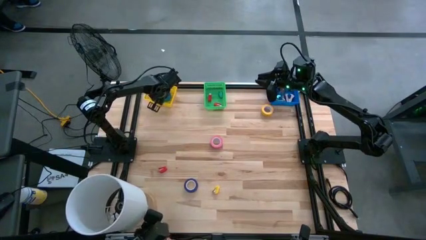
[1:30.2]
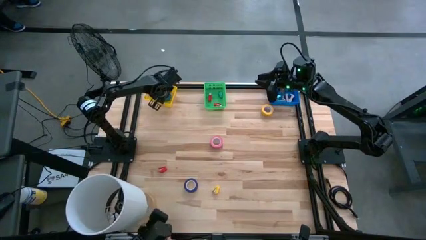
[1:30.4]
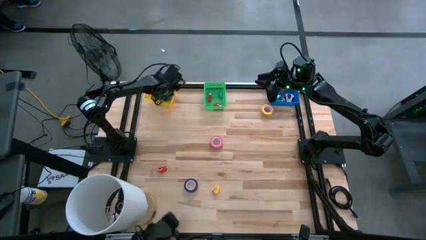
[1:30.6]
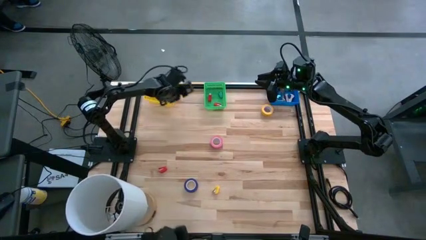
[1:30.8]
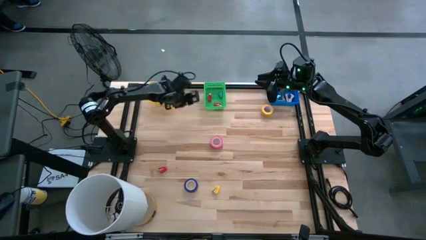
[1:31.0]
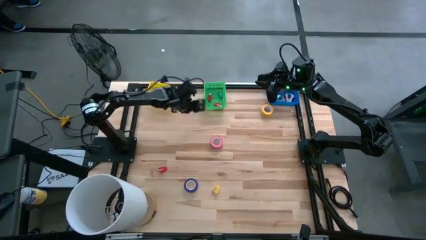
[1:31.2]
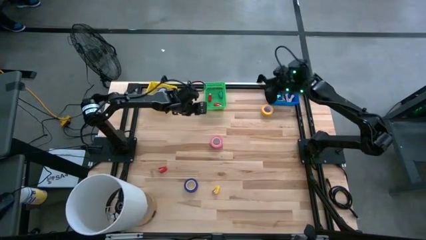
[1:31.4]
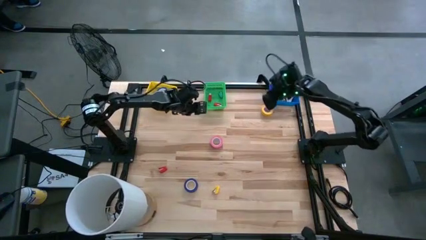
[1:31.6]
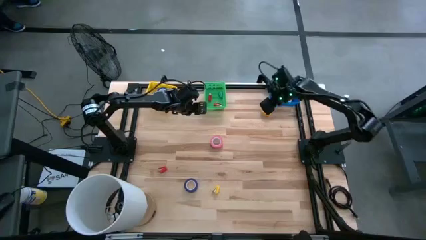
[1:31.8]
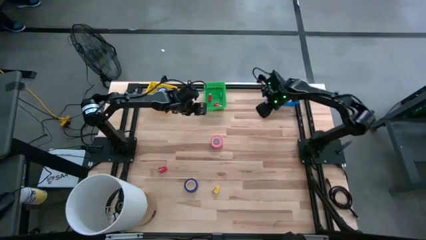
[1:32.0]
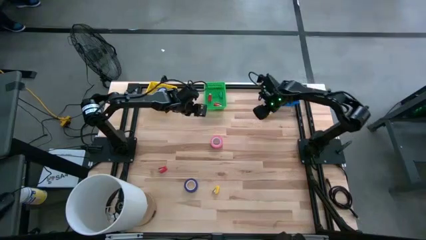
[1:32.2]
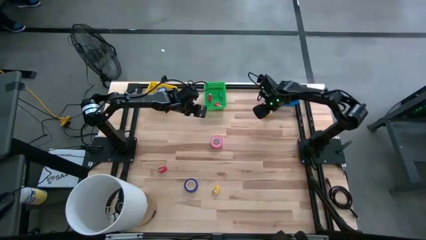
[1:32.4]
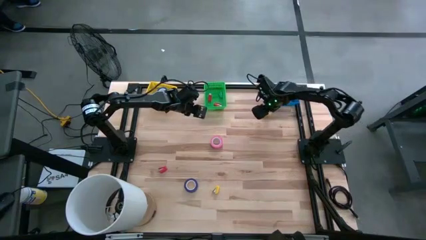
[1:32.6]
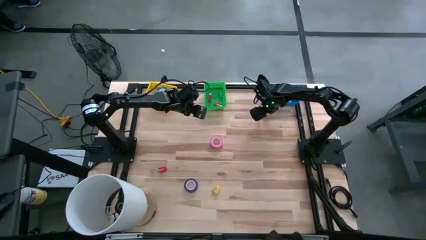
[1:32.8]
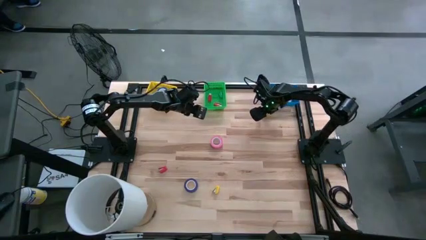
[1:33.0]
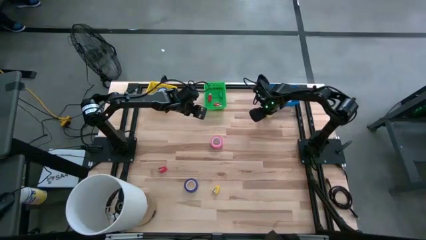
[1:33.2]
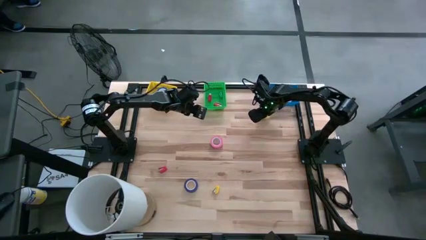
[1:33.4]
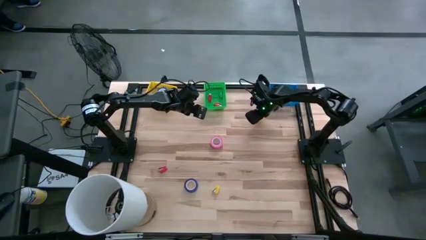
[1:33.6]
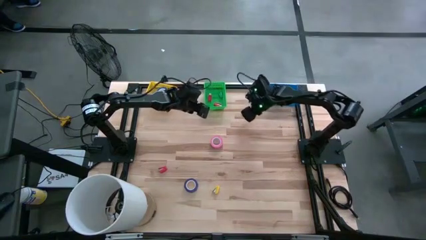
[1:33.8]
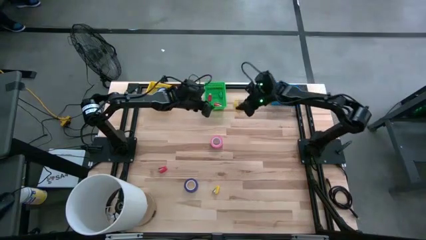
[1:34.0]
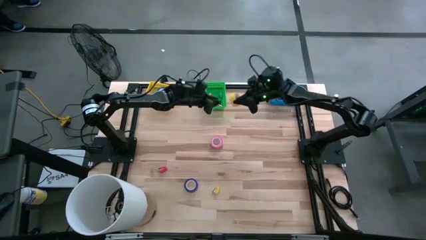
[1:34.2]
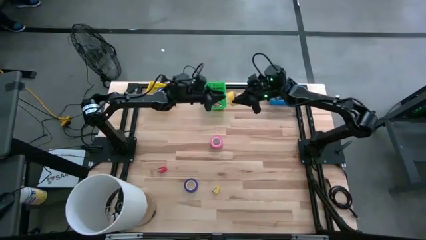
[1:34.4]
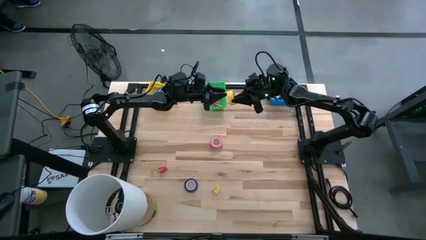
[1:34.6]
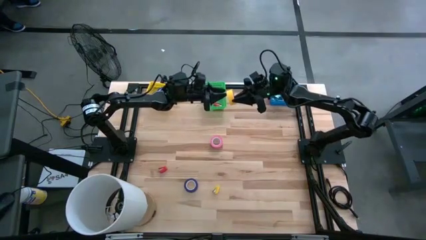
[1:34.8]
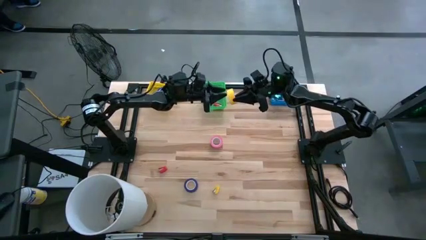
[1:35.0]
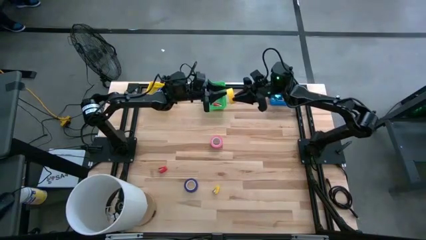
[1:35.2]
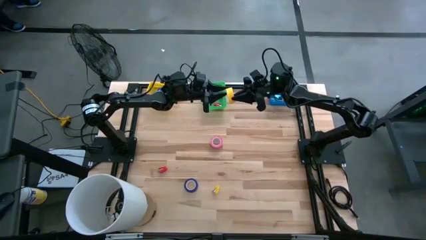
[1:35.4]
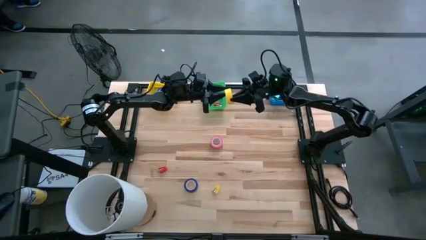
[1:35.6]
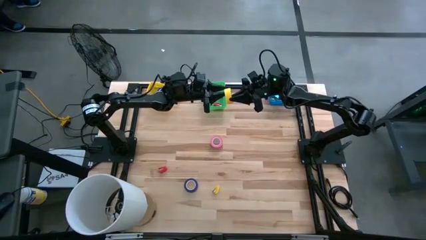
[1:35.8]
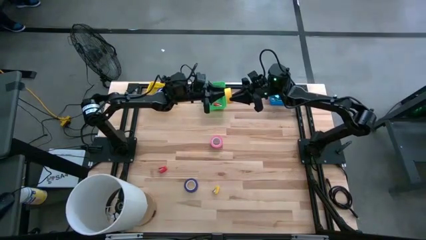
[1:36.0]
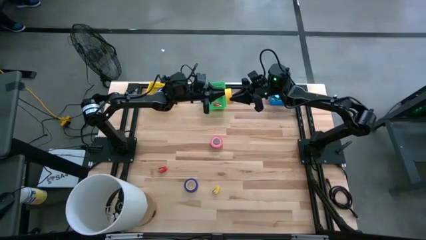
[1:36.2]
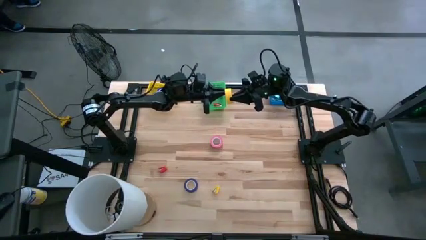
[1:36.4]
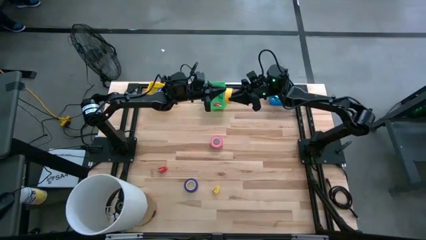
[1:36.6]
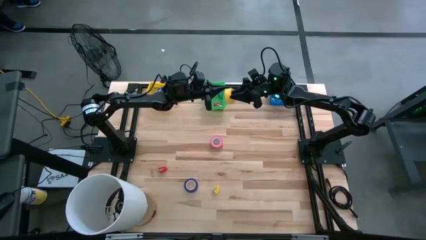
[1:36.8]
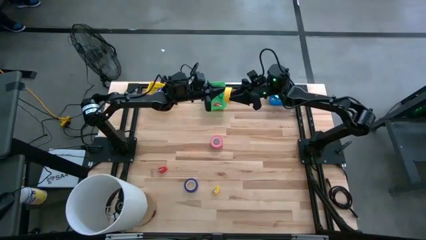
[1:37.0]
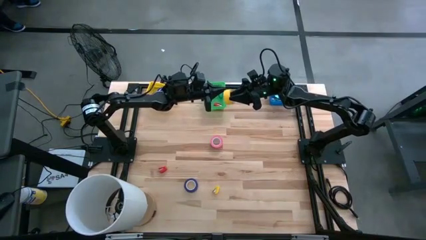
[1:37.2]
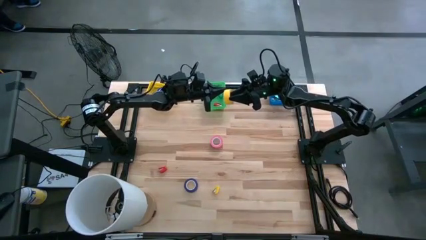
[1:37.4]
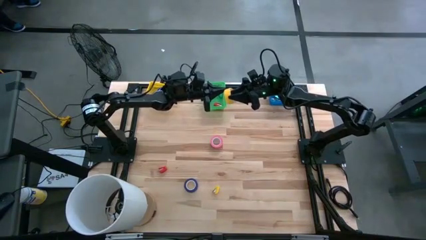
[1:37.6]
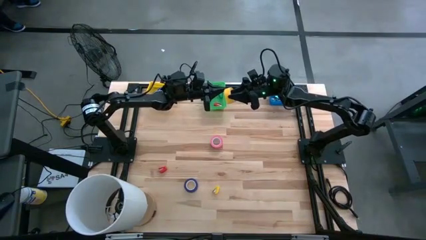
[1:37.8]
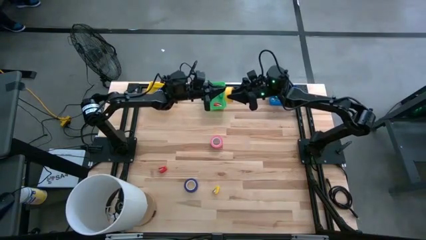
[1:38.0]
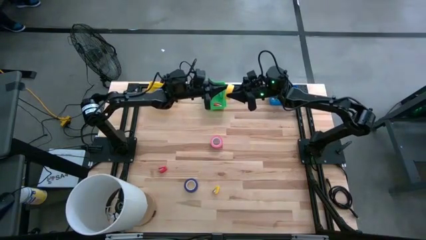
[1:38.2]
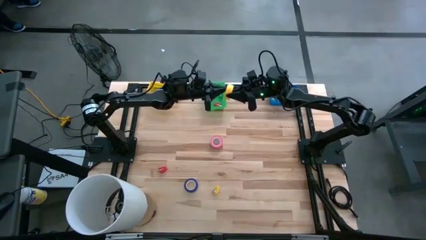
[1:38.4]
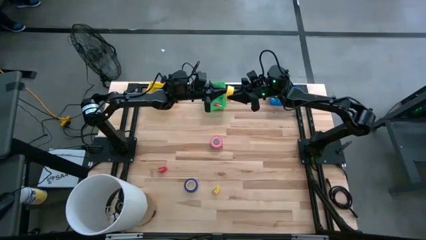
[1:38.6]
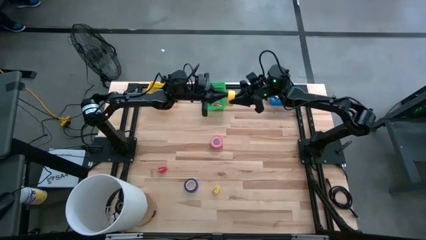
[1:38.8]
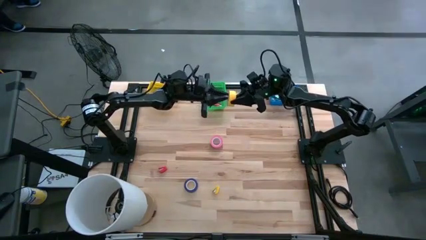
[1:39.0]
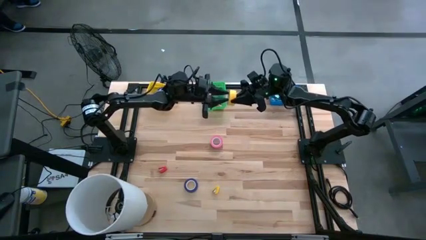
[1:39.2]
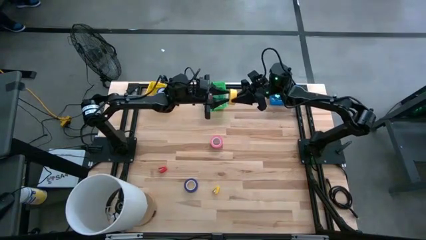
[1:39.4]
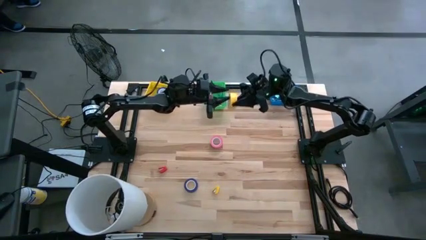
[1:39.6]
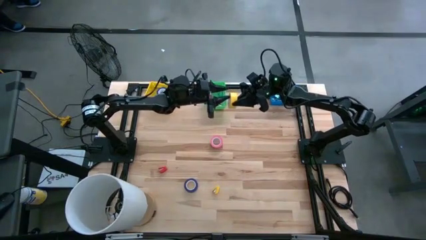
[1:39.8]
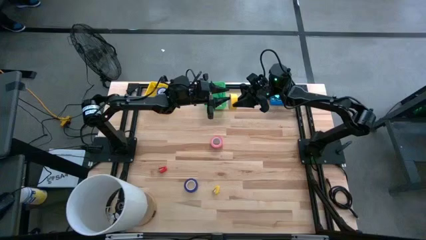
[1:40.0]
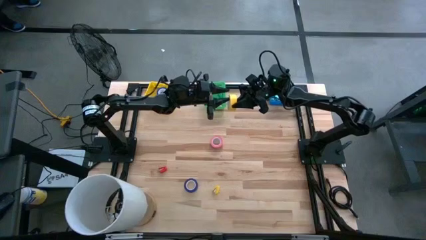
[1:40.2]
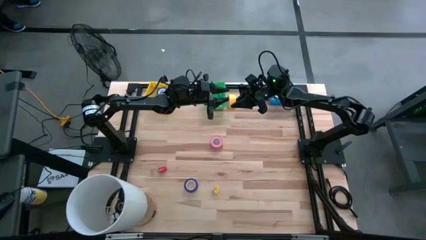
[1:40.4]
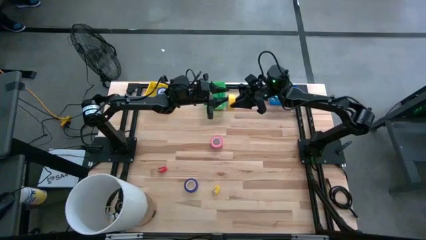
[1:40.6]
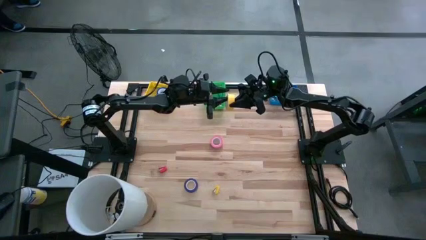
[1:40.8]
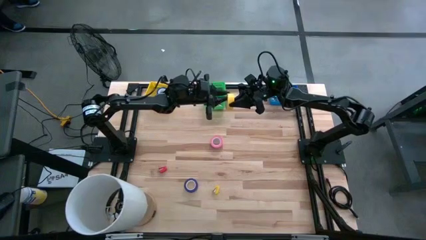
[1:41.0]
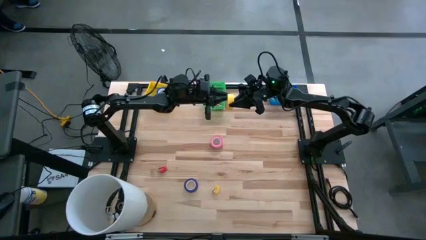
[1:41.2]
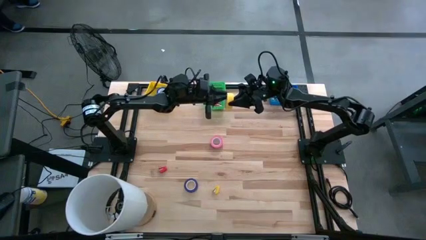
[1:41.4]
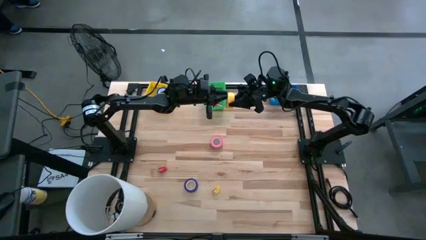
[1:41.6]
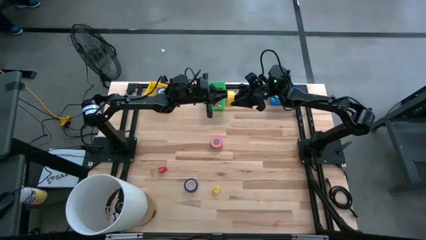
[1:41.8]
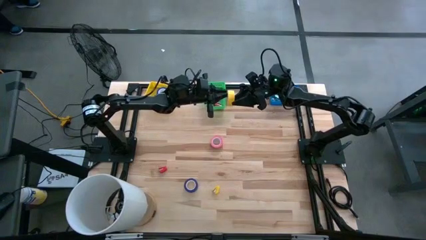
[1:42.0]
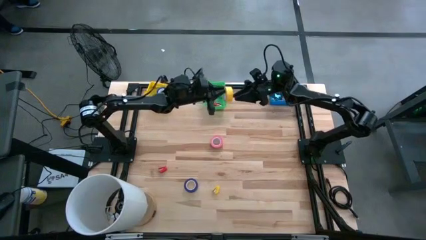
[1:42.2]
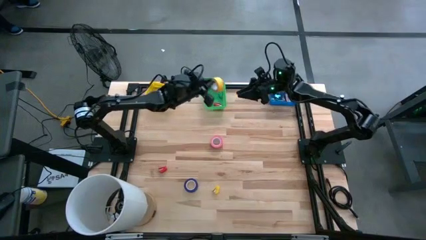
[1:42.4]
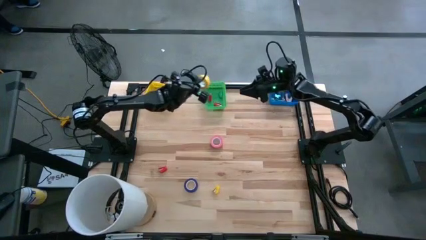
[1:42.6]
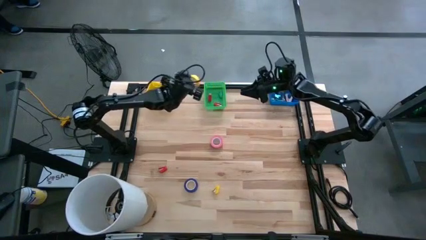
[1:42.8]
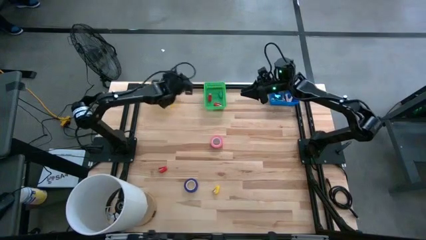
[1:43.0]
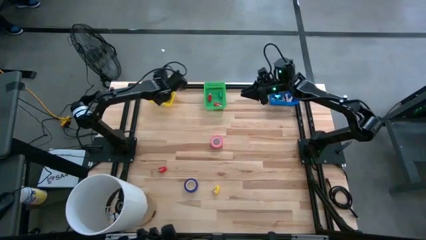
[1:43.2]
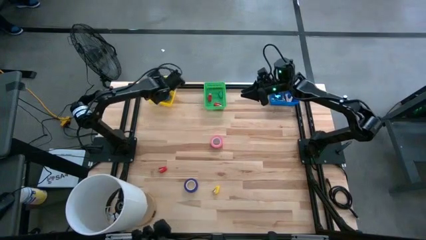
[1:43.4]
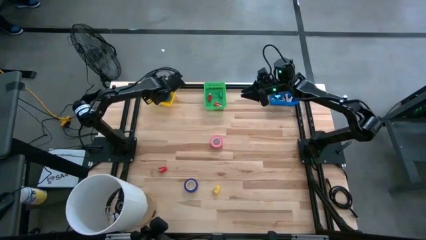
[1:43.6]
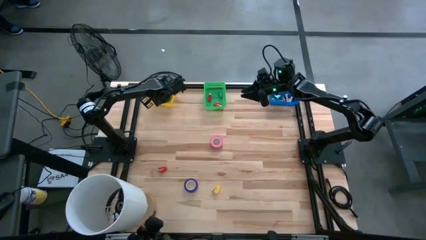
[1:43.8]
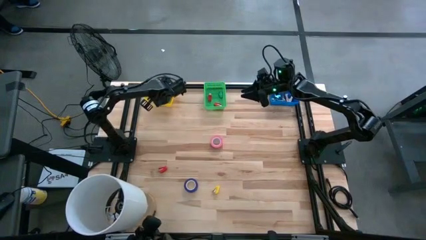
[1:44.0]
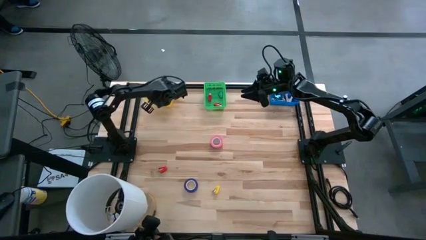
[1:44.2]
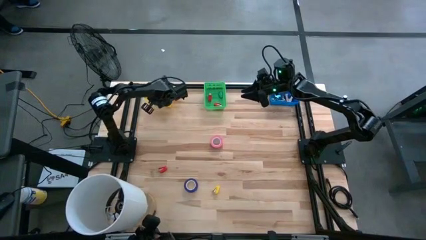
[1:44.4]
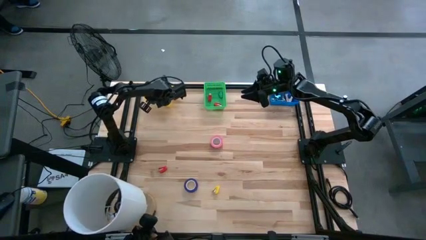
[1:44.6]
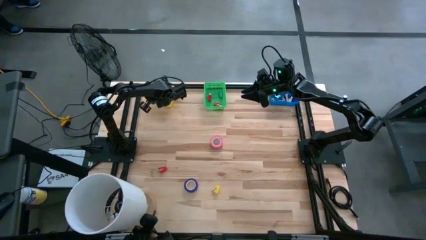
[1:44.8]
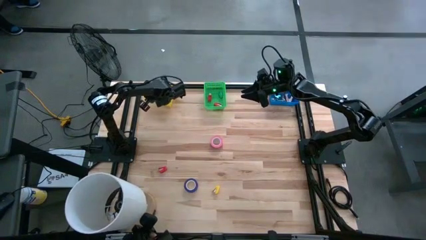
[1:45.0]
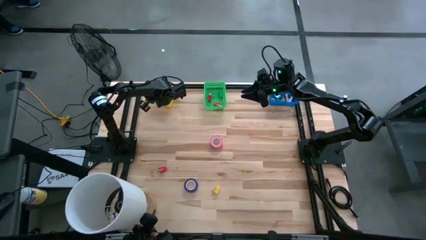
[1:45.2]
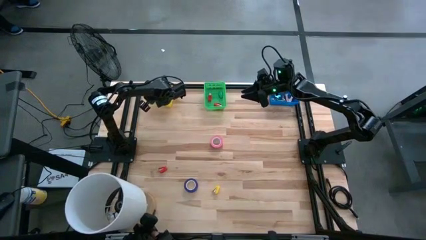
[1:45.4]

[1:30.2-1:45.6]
Task: Pick and place Stapler, Stapler remover, tape
Put the yellow tape into the yellow basket

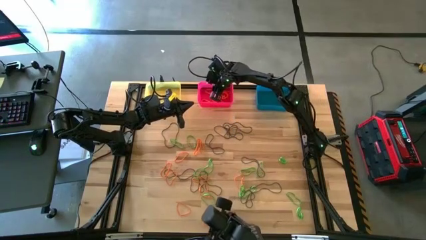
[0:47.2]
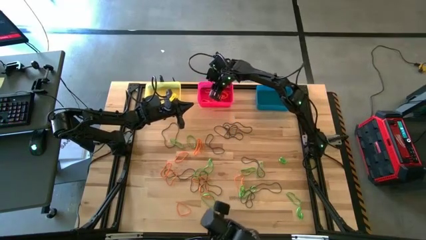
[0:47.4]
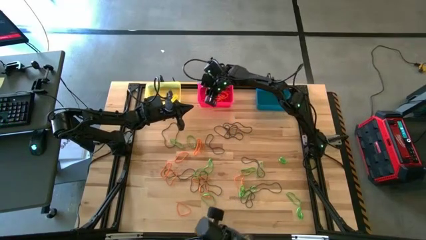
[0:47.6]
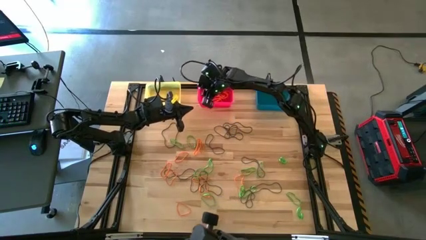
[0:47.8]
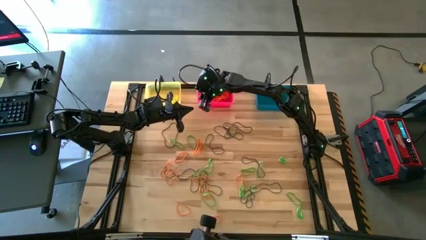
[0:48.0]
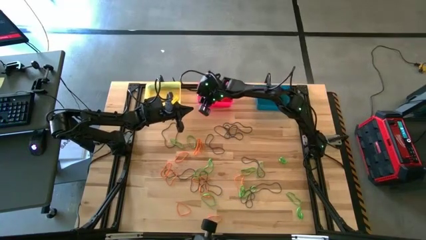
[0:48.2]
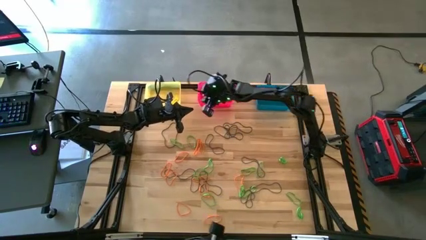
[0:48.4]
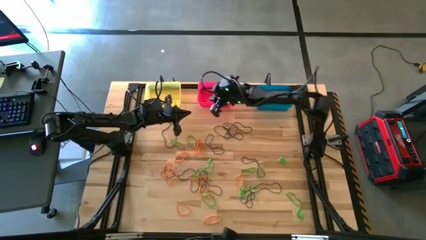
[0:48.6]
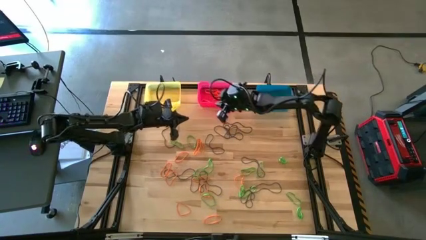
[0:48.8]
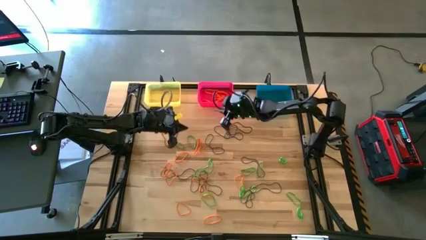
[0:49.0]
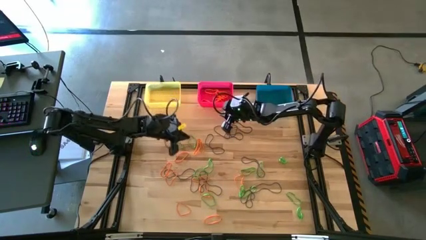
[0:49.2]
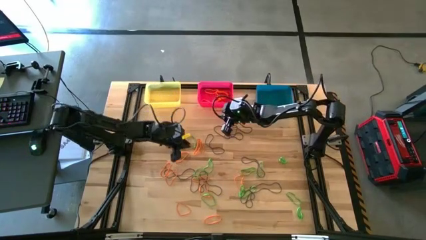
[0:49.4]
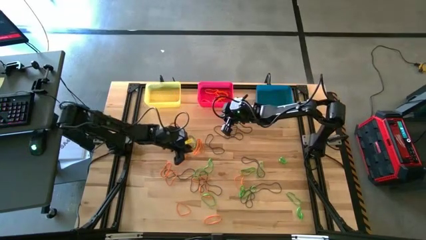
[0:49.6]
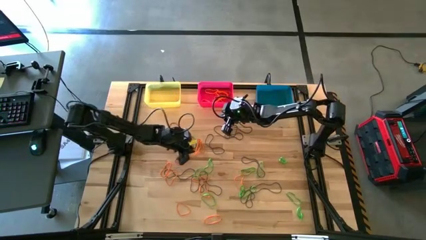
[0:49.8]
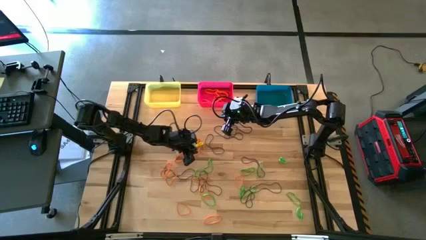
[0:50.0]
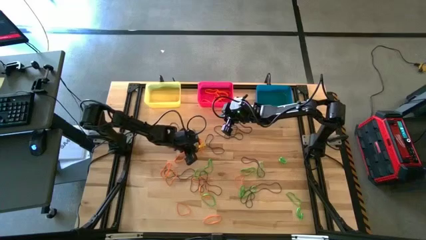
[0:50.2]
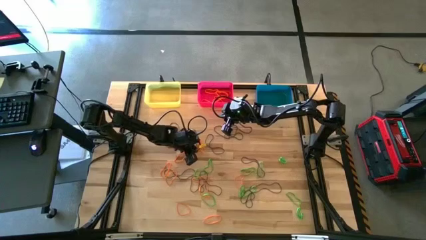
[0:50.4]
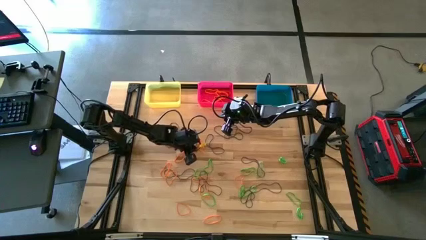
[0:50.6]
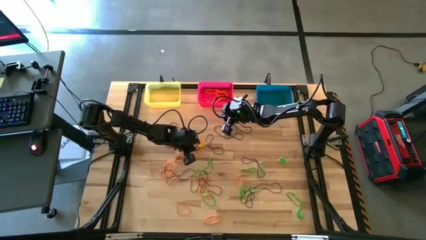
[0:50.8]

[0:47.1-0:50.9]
Task: Sort rubber bands into baskets
Put the orange rubber band into the pink bin
